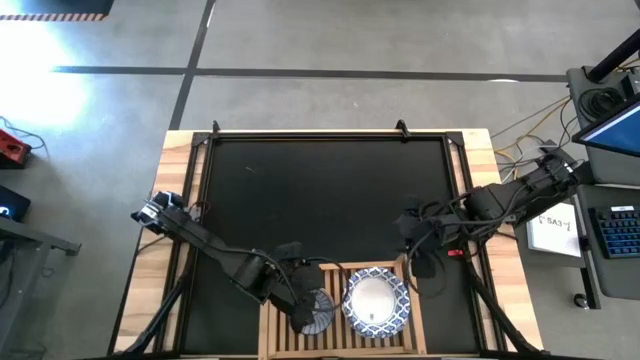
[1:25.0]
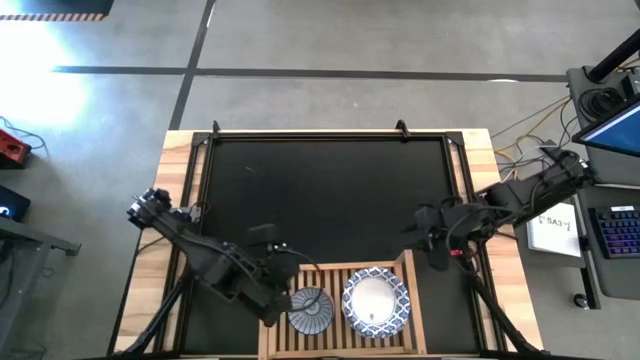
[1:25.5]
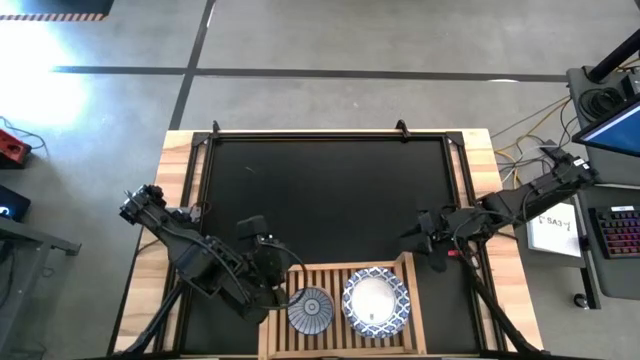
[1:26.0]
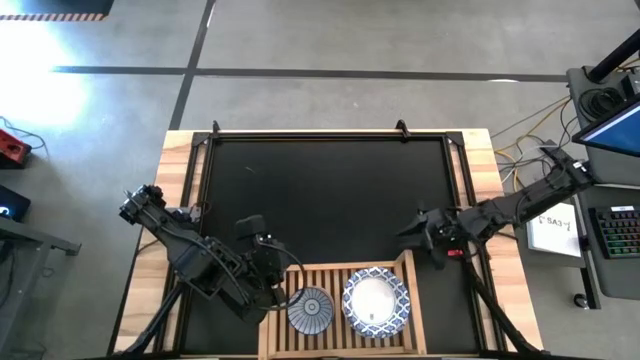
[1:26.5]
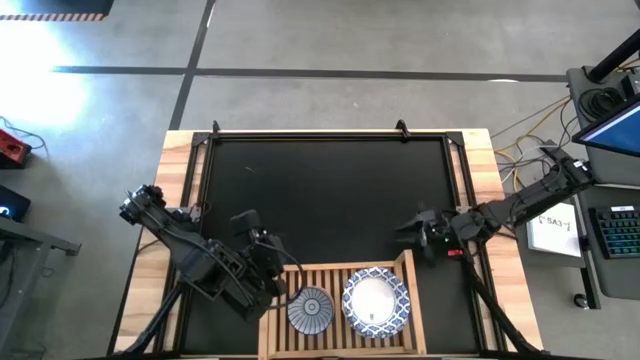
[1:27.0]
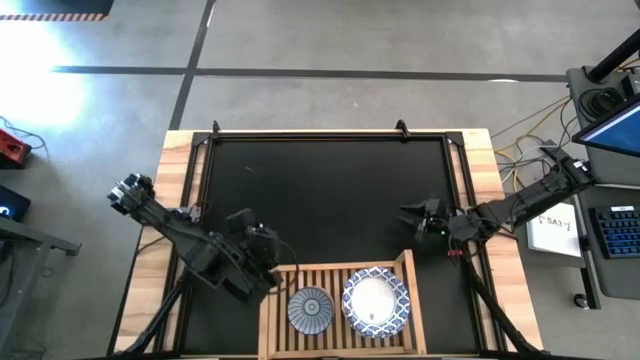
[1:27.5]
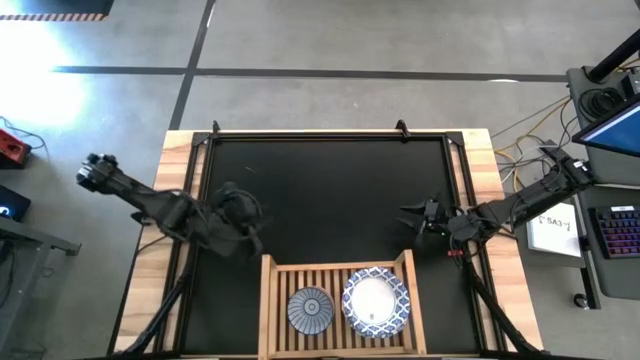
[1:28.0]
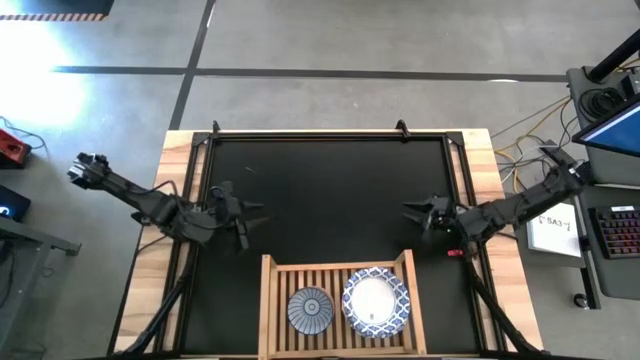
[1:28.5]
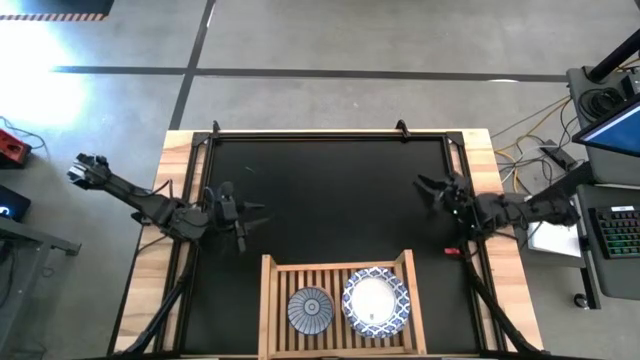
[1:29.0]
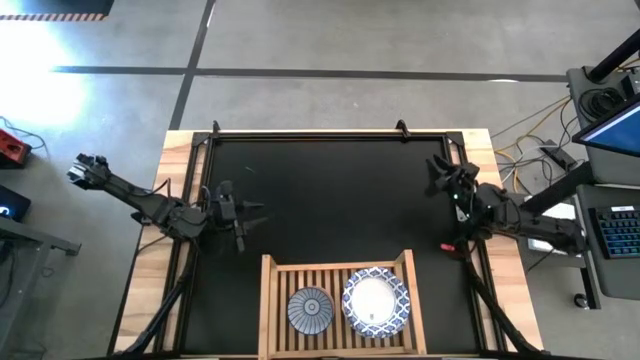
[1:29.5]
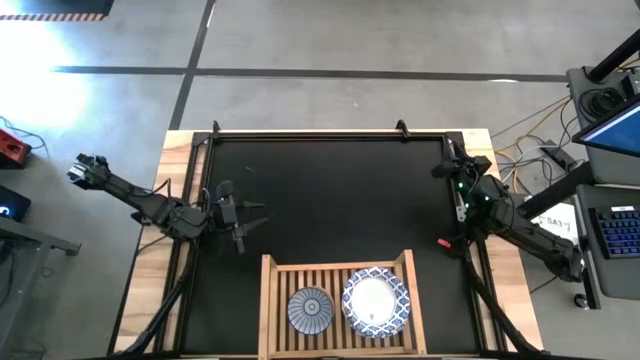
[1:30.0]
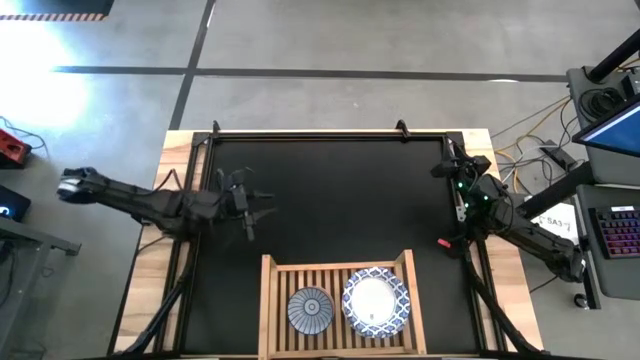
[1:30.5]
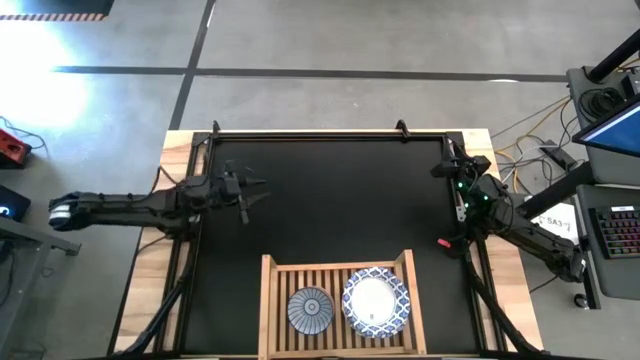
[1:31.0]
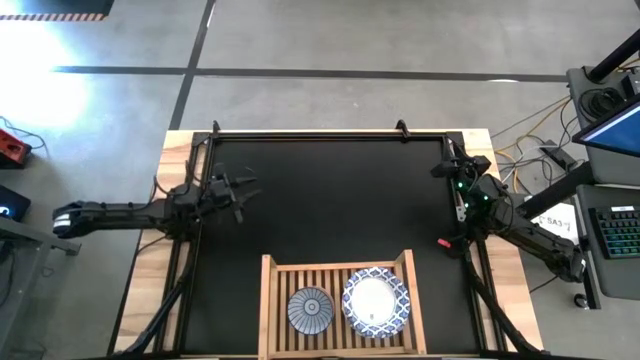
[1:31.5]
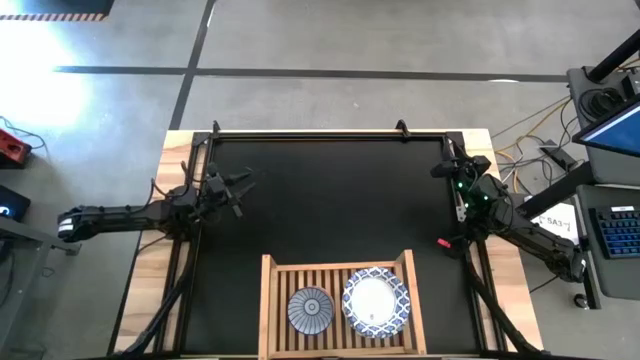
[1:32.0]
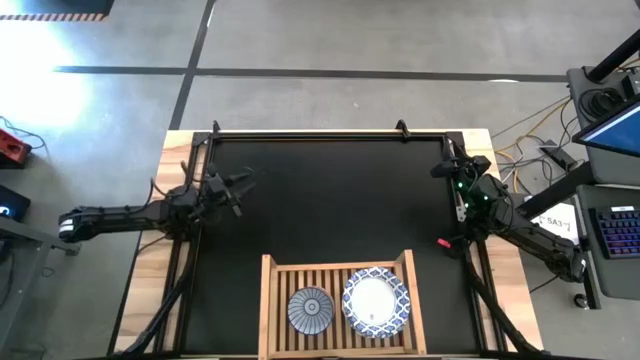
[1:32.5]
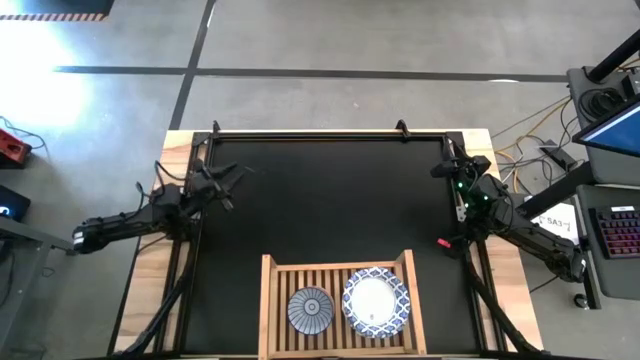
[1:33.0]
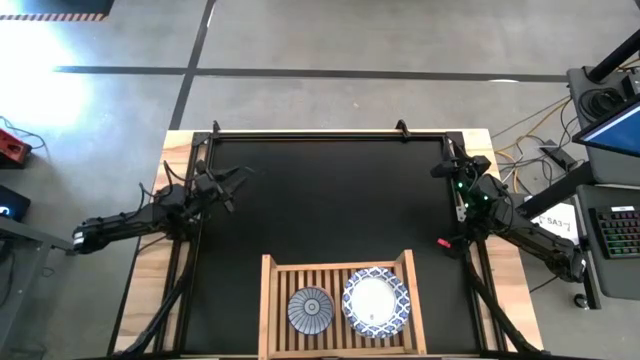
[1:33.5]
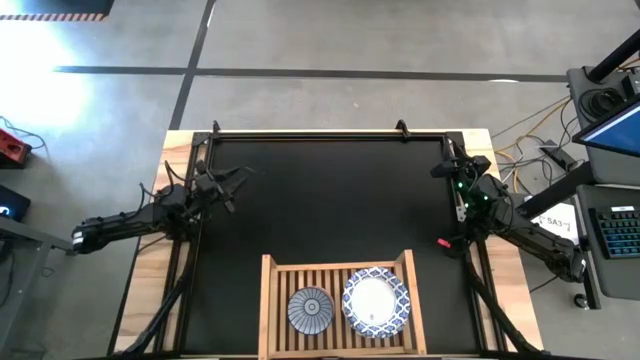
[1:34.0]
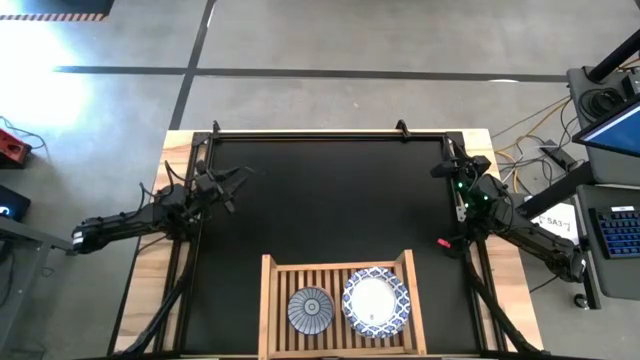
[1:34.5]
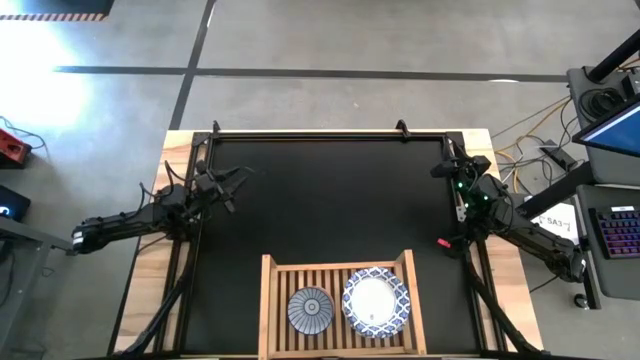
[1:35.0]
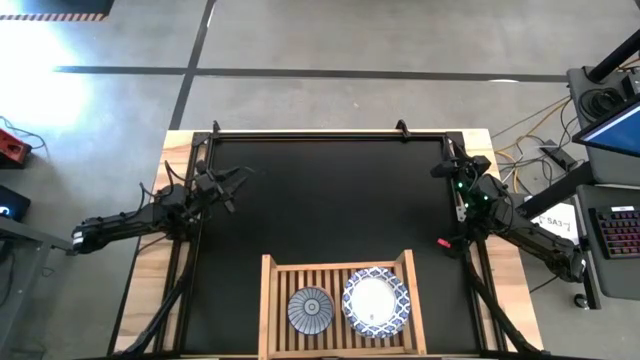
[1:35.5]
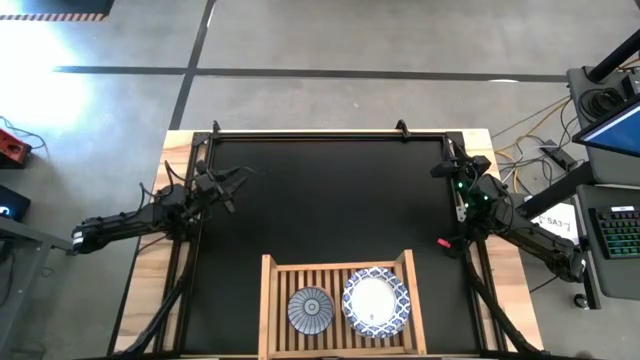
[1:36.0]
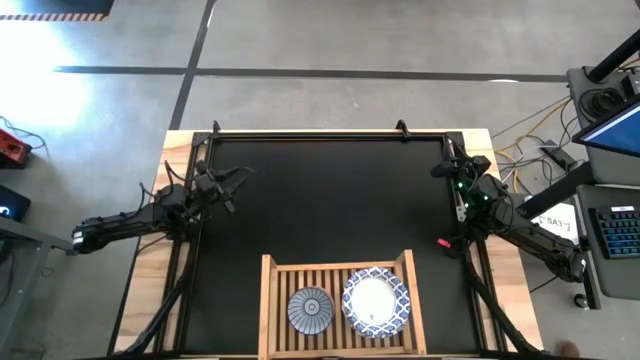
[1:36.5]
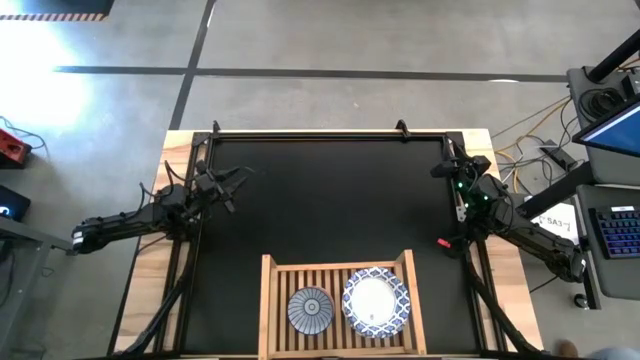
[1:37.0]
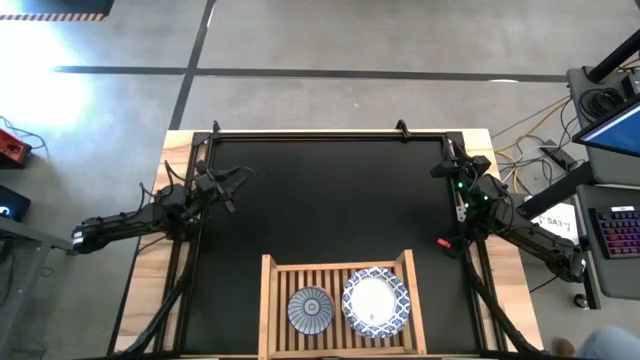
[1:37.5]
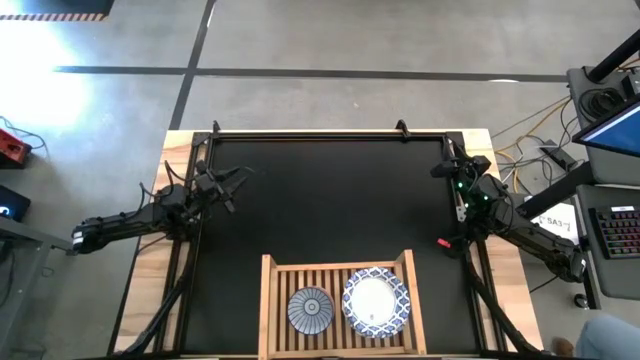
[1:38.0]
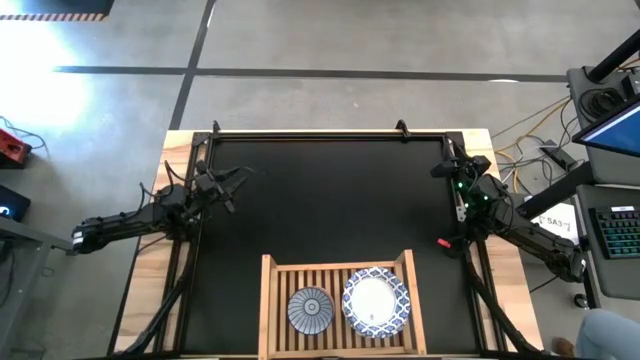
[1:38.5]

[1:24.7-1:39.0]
Task: Place and stack bowls onto a shelf
Return to Home Position

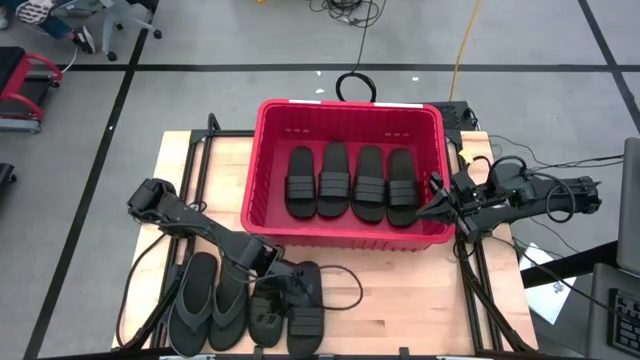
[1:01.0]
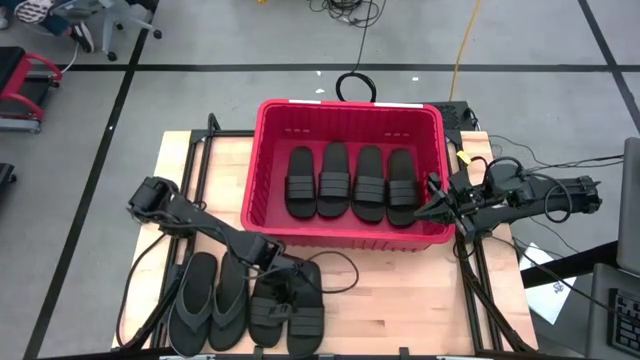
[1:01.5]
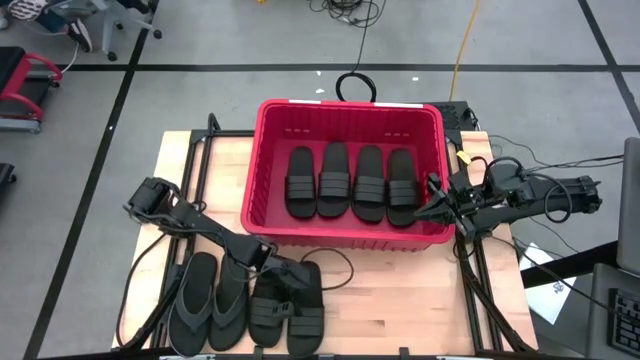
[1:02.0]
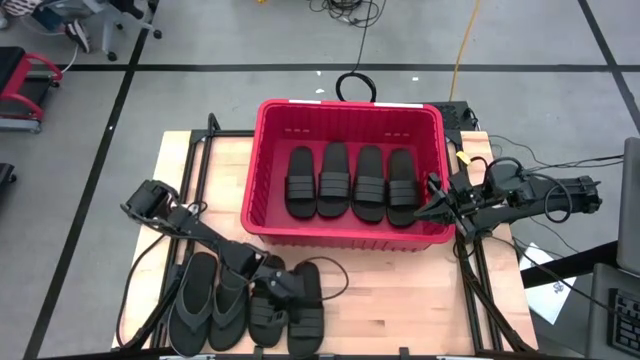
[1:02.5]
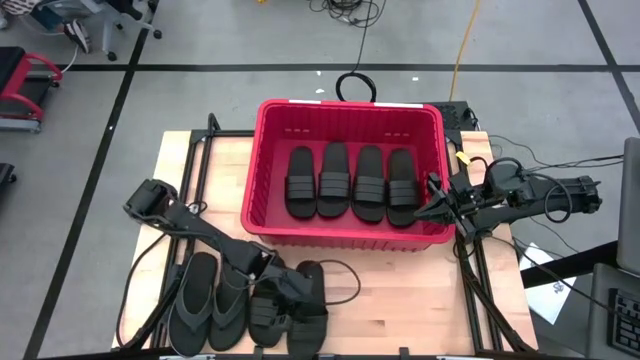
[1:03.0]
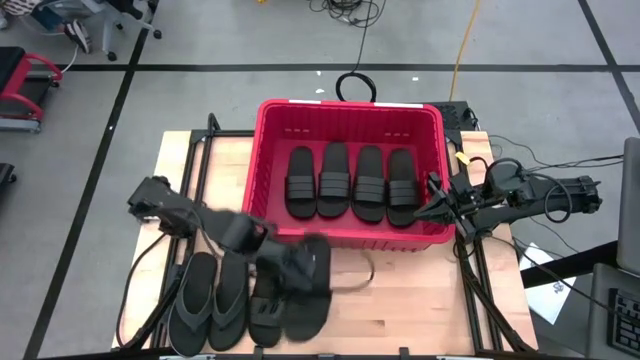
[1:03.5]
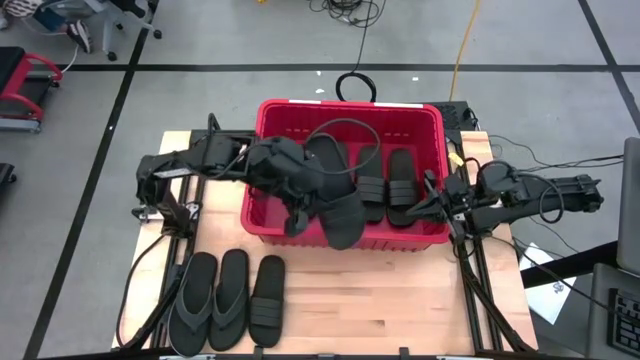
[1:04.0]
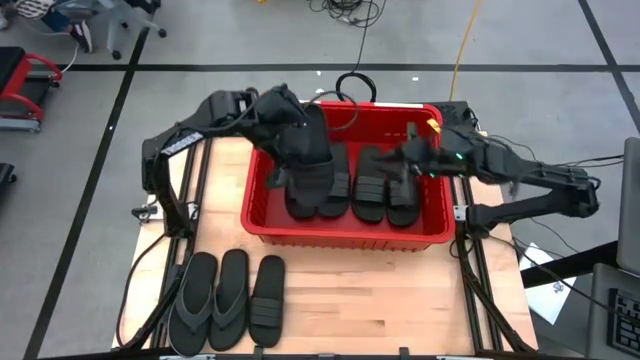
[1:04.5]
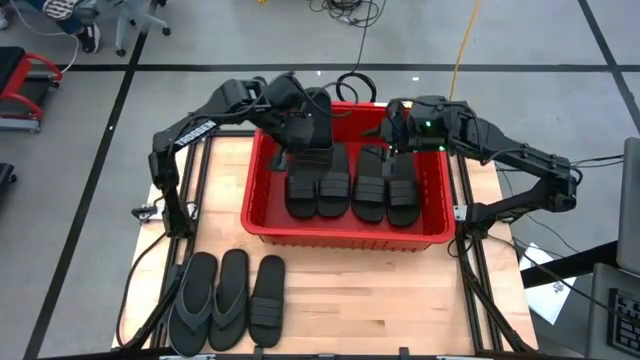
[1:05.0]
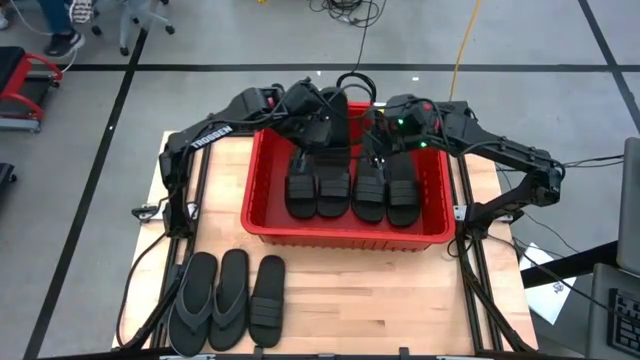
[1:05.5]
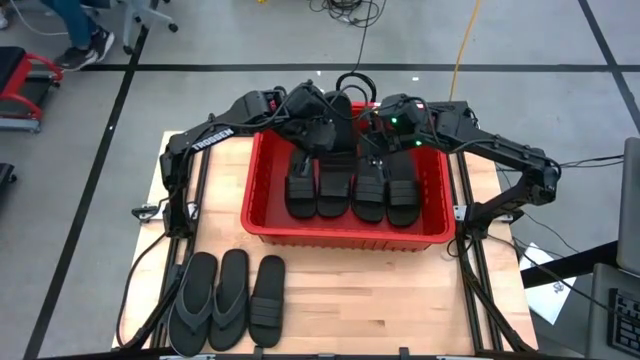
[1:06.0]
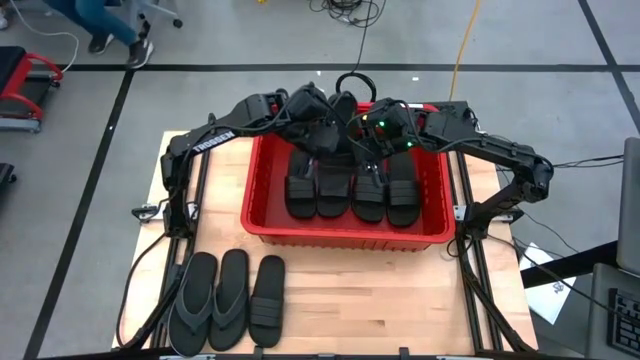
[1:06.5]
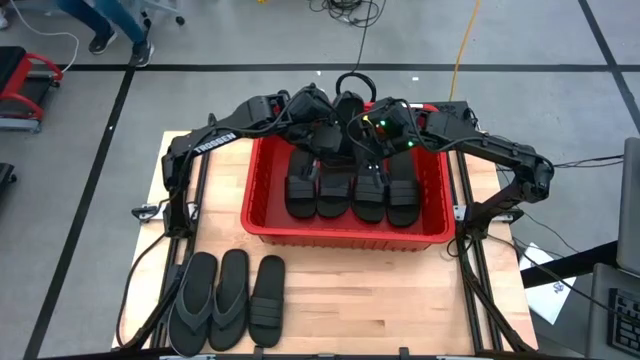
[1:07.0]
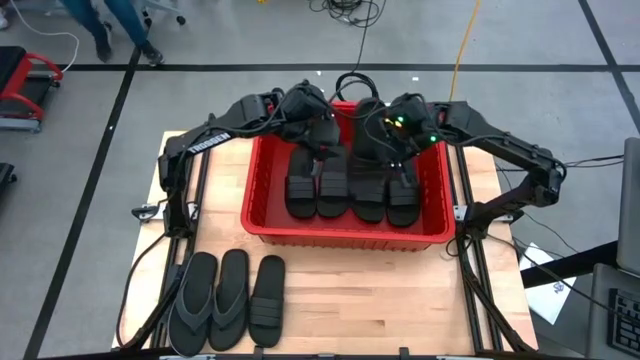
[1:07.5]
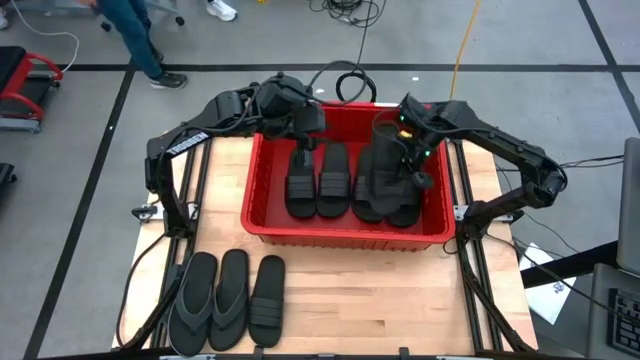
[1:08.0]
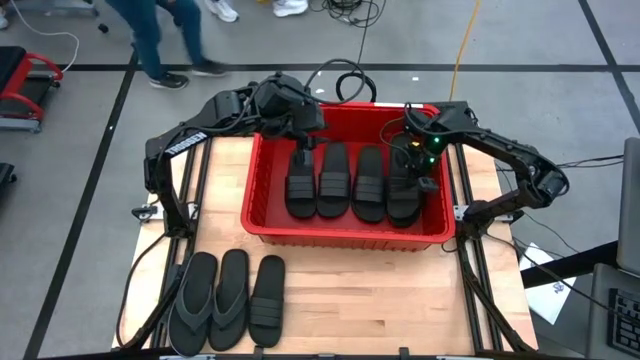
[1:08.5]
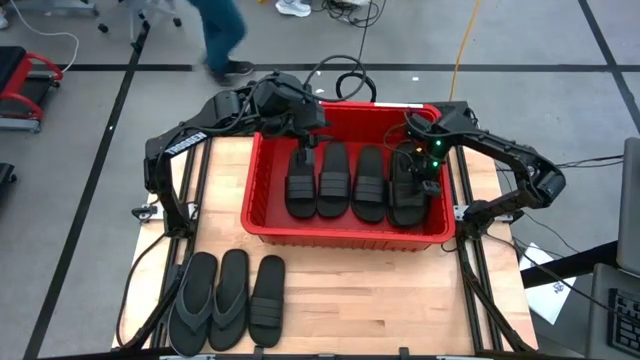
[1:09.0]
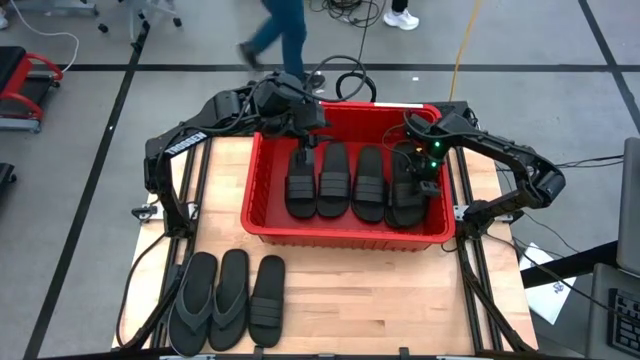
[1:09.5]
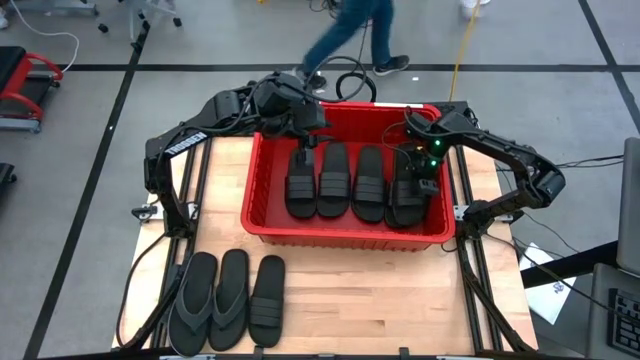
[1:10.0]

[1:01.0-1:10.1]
Task: Pick and place slides into bin
Put the black slide into the red bin
